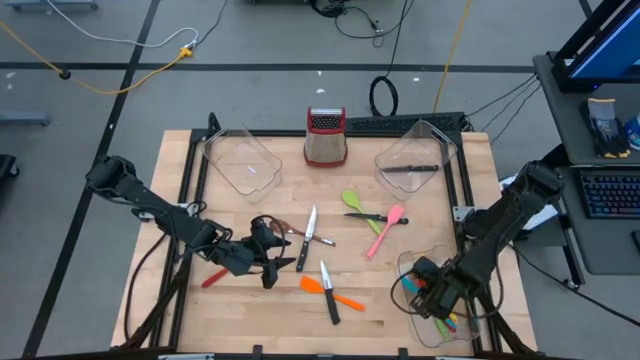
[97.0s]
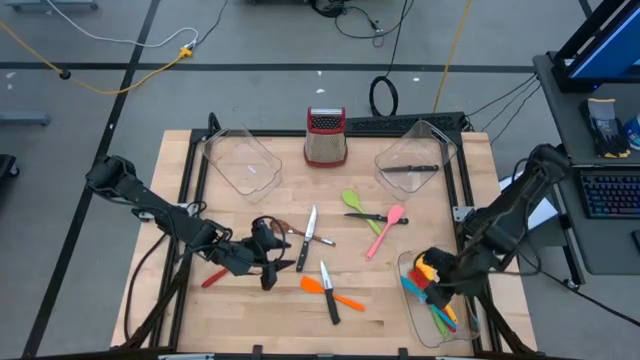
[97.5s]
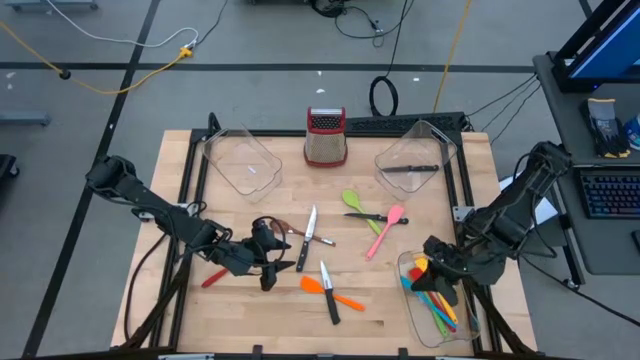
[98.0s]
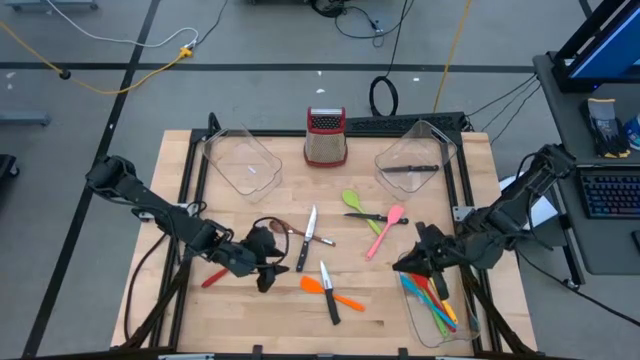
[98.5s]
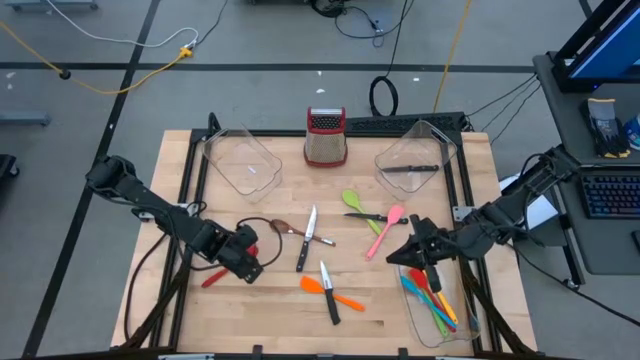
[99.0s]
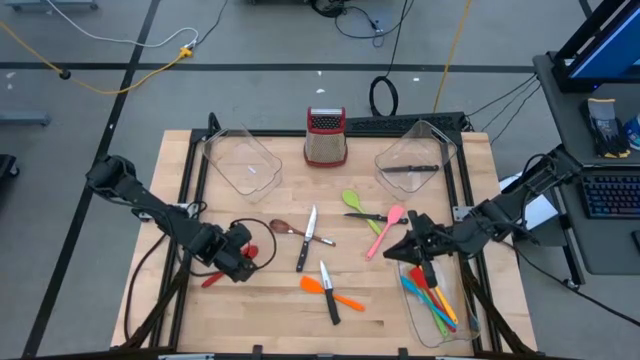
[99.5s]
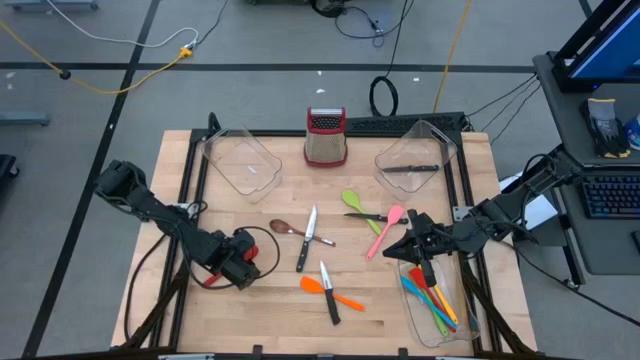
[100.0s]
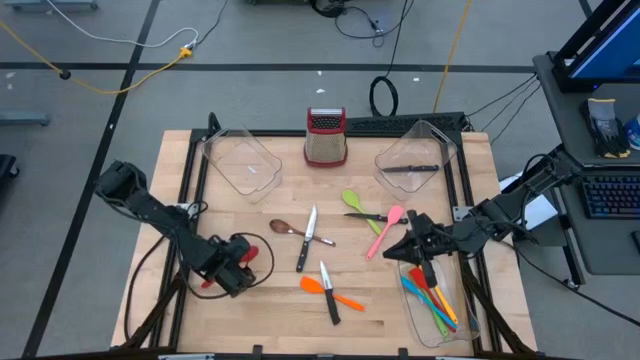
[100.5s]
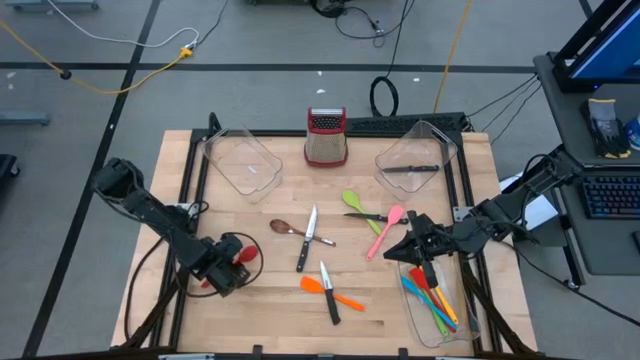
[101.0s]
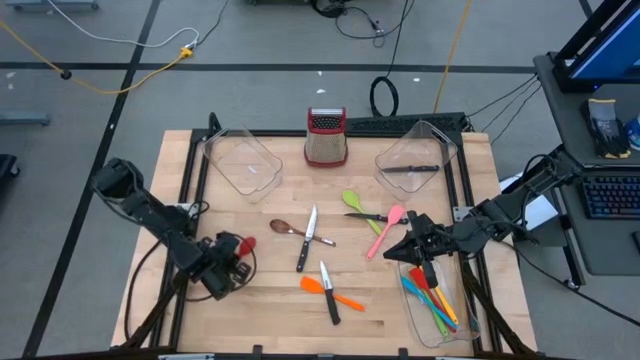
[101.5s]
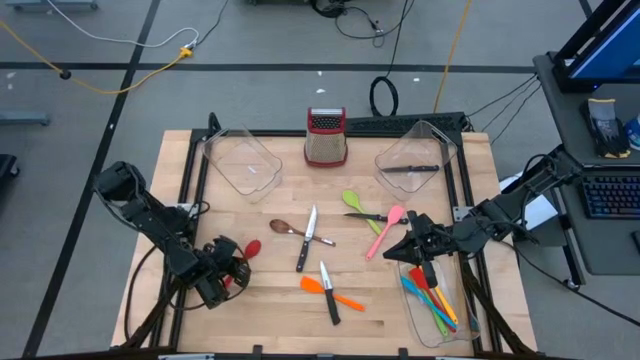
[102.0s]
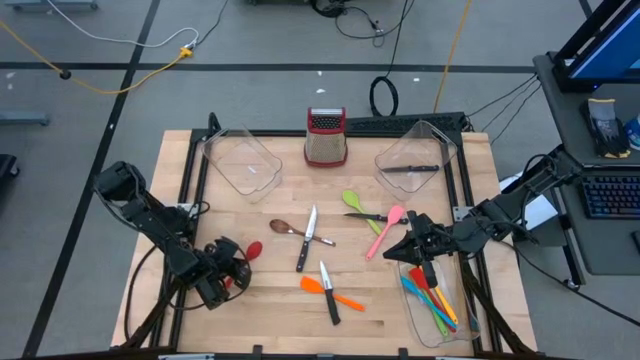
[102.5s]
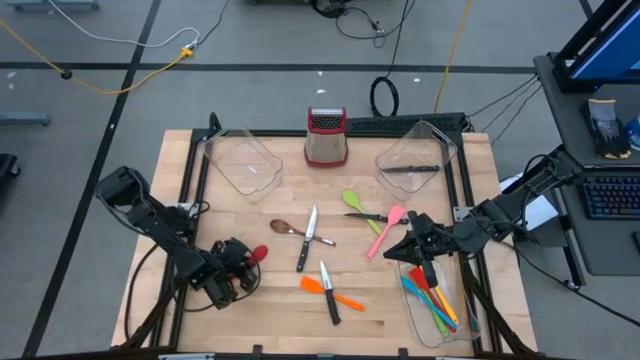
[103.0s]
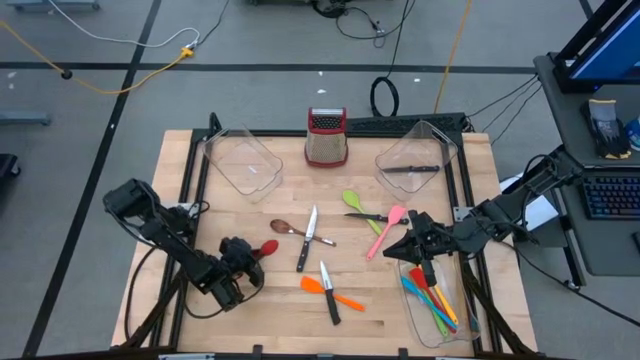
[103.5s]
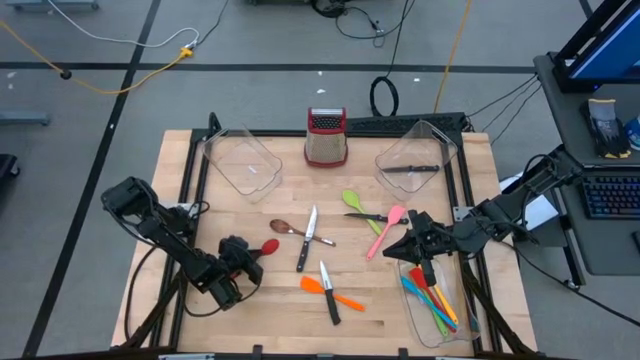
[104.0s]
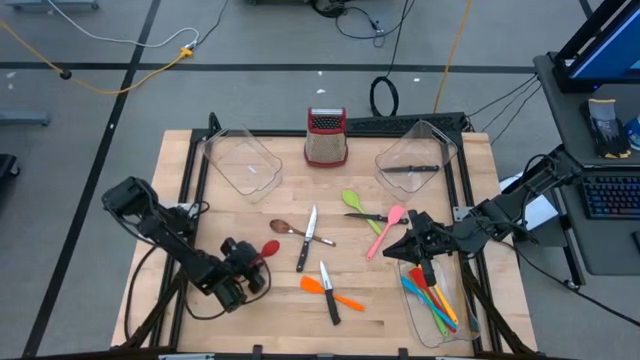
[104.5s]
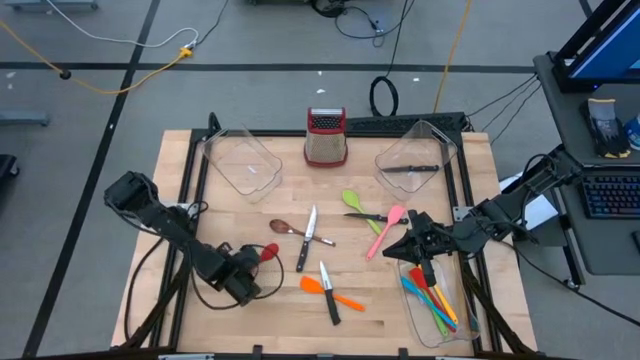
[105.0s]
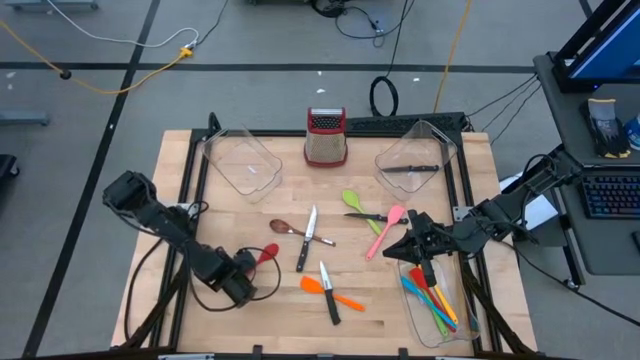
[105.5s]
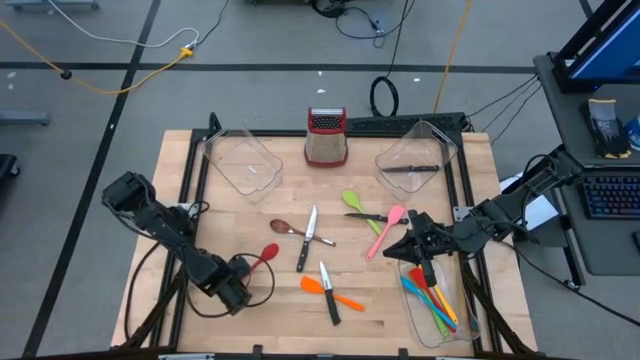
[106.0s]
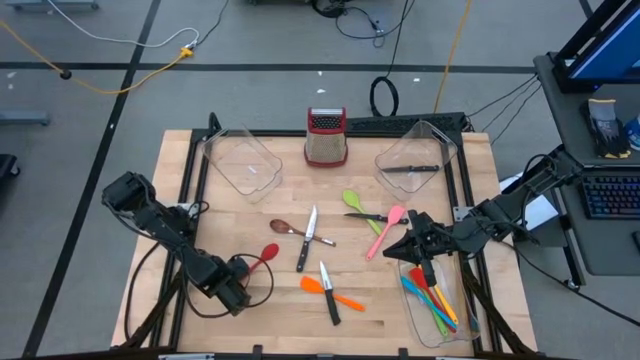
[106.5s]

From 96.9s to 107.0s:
Task: Pick & Place Kitchen Items
Put the red serving spoon into the top left transparent bin

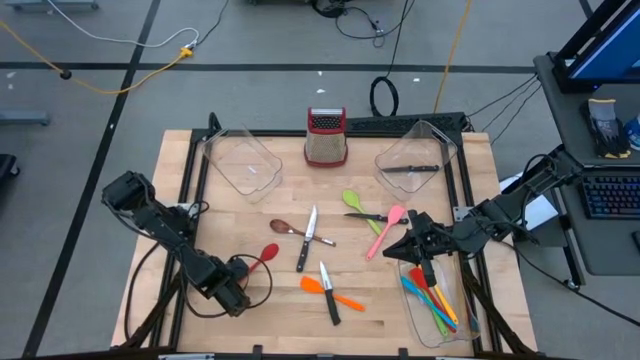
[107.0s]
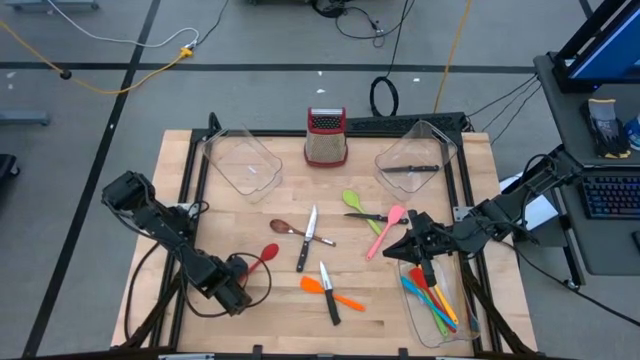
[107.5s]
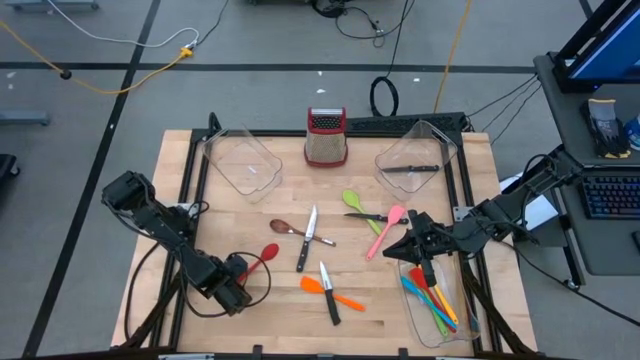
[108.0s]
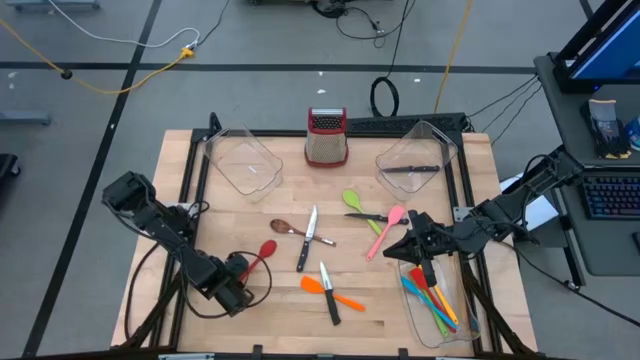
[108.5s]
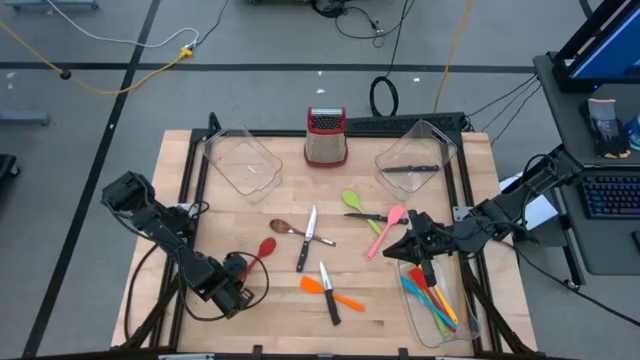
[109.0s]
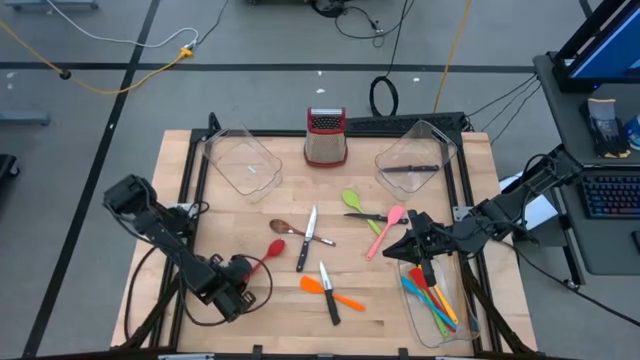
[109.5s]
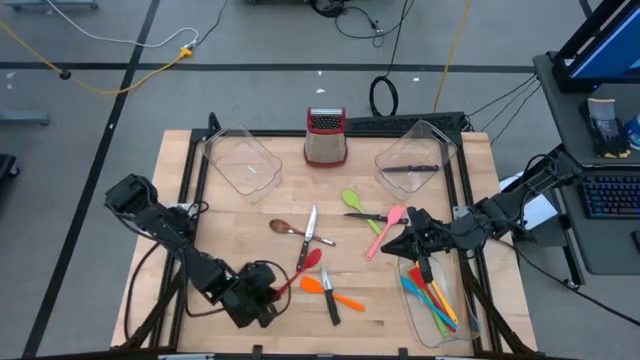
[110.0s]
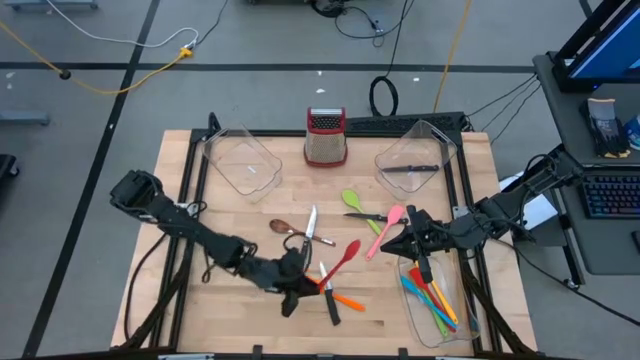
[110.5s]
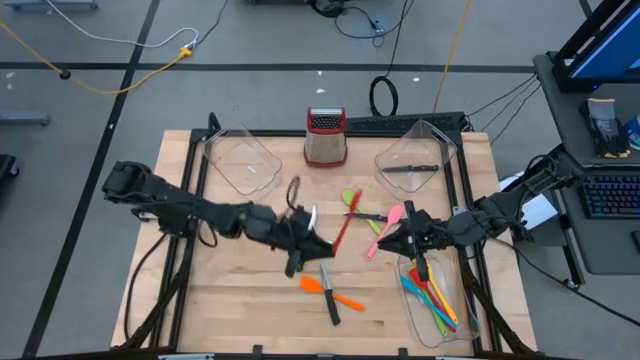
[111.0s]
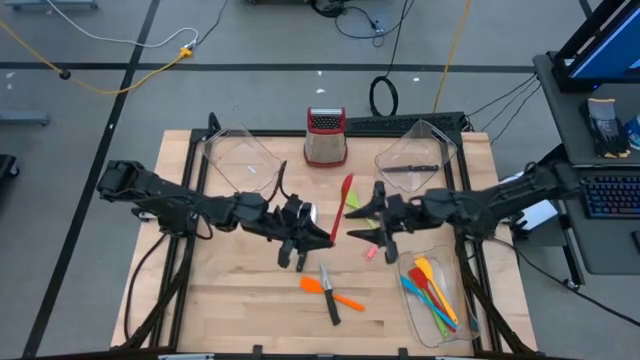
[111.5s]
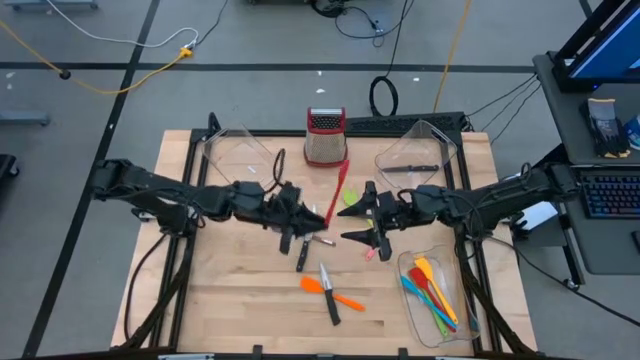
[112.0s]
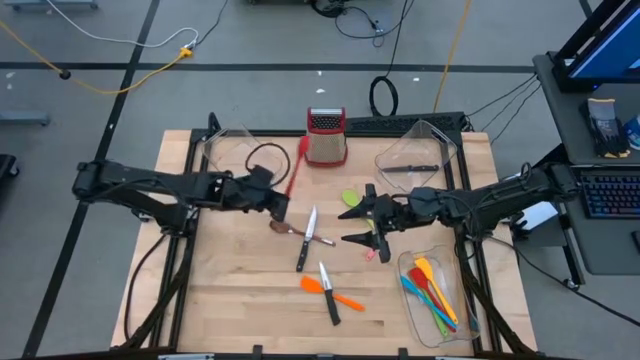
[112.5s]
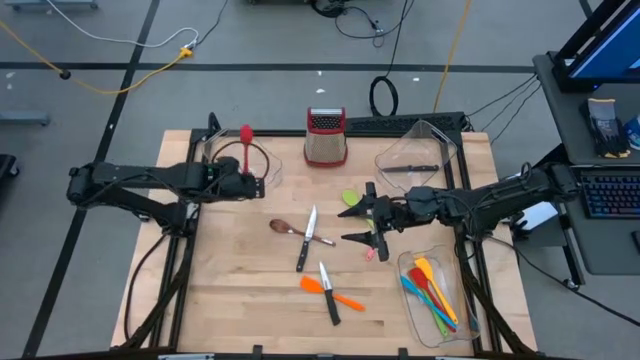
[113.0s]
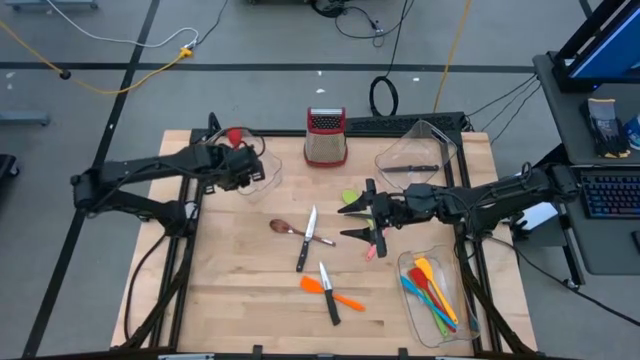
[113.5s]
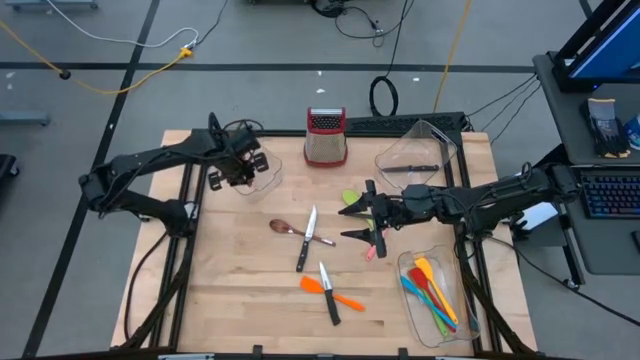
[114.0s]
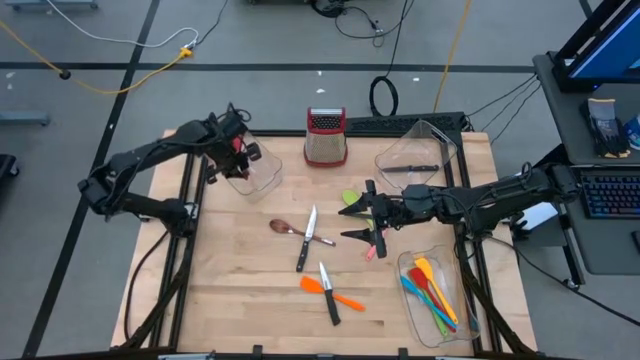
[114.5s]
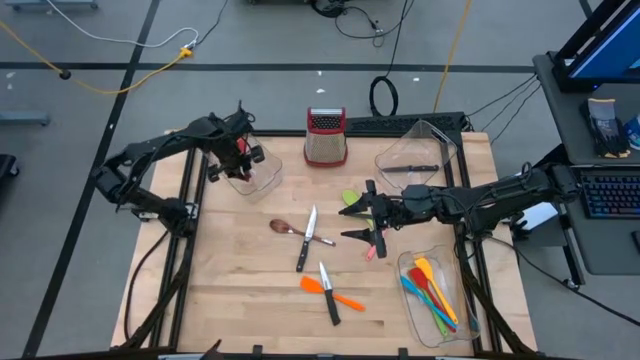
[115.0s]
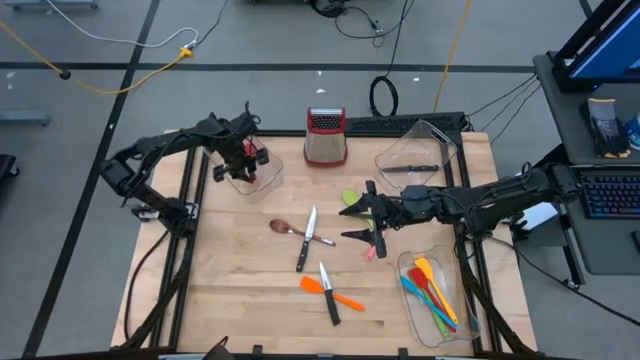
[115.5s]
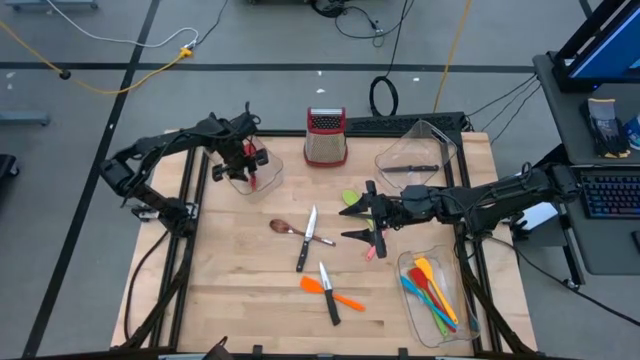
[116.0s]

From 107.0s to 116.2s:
Put the red serving spoon into the top left transparent bin

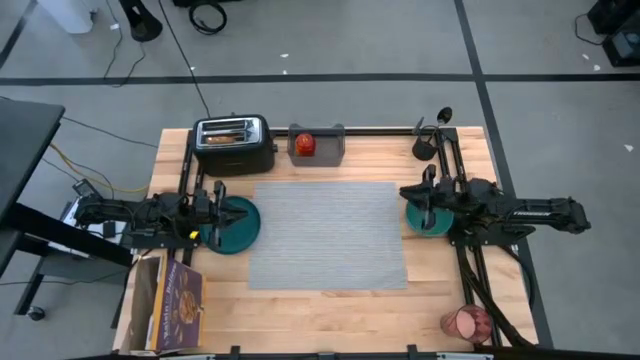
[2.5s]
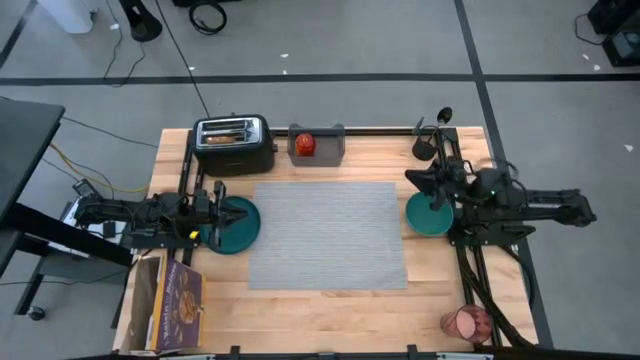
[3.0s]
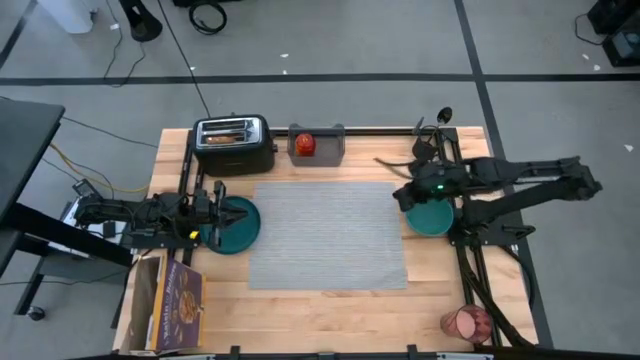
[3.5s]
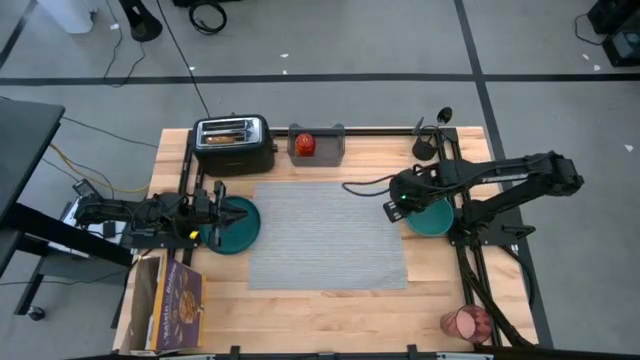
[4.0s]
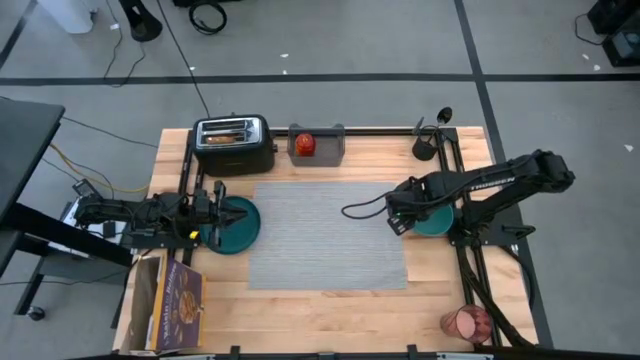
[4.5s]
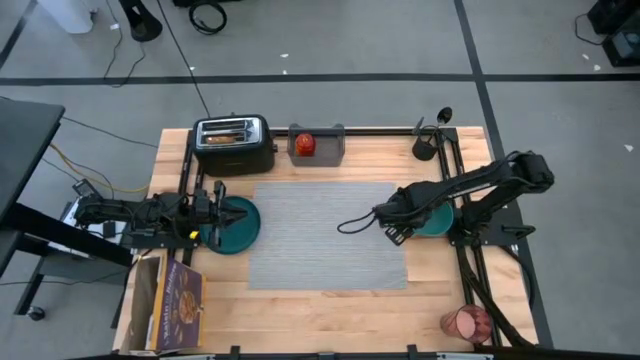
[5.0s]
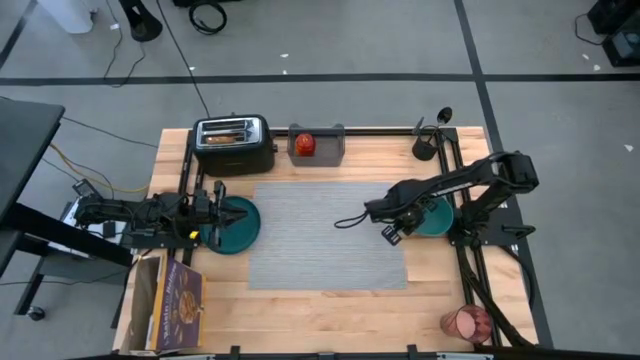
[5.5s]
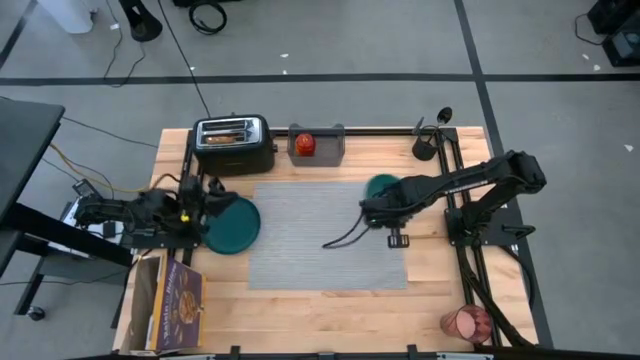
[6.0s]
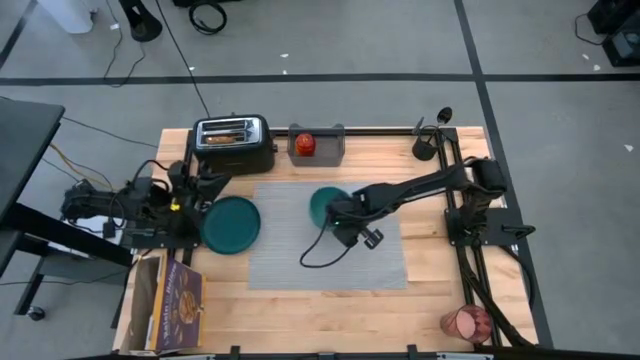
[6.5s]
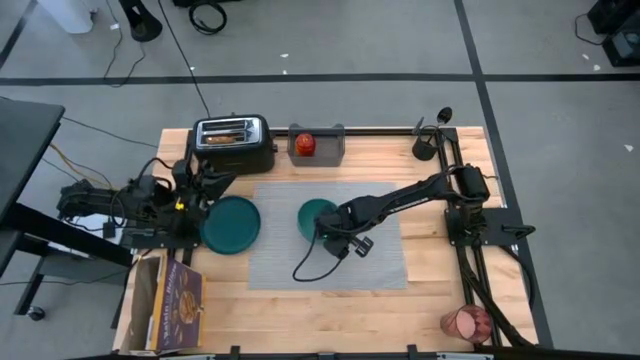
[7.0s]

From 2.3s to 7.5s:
Task: Arrange a breakfast setting
Put the green bowl on the placemat
